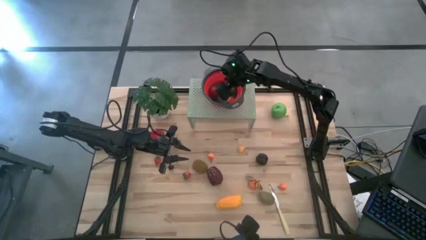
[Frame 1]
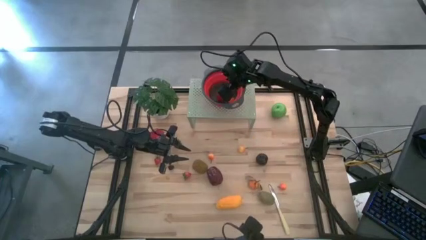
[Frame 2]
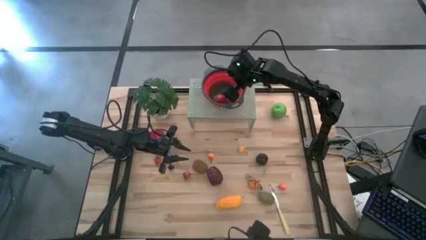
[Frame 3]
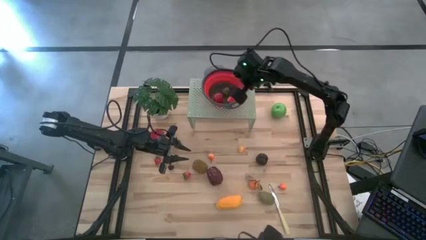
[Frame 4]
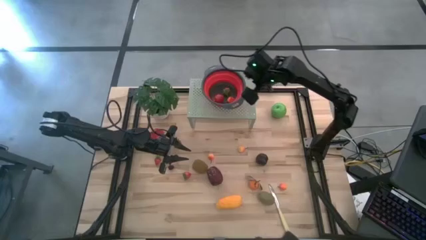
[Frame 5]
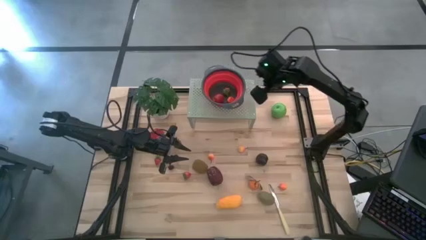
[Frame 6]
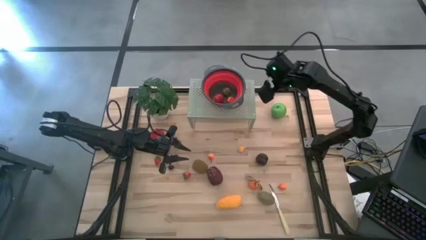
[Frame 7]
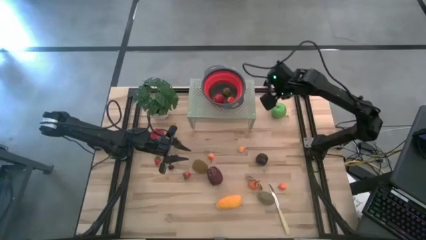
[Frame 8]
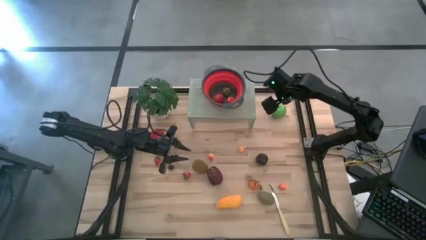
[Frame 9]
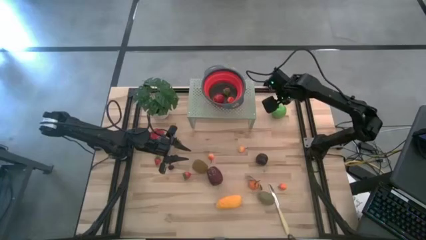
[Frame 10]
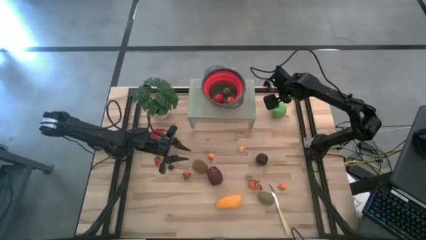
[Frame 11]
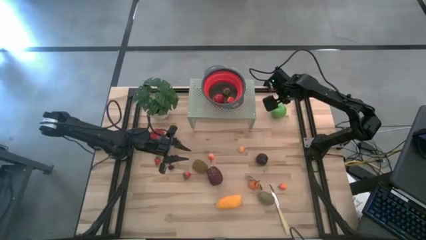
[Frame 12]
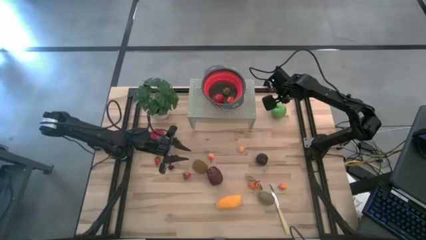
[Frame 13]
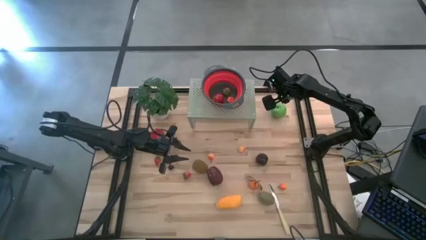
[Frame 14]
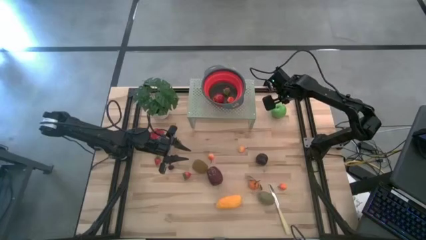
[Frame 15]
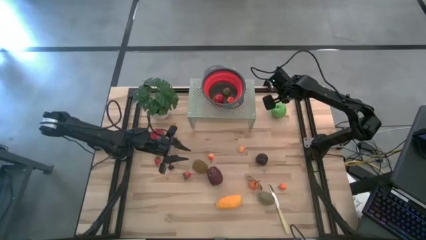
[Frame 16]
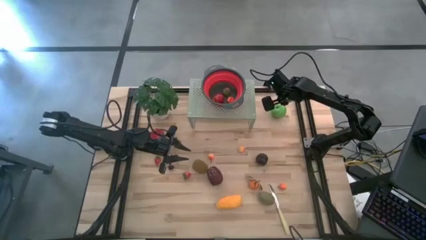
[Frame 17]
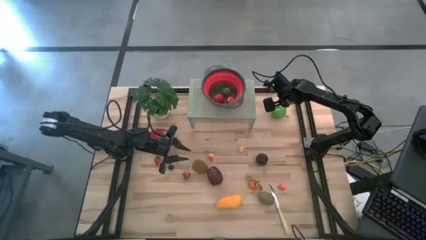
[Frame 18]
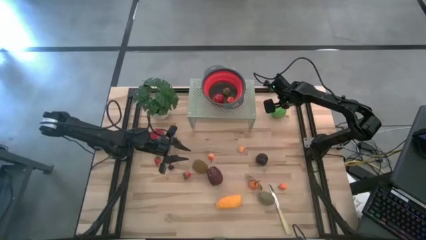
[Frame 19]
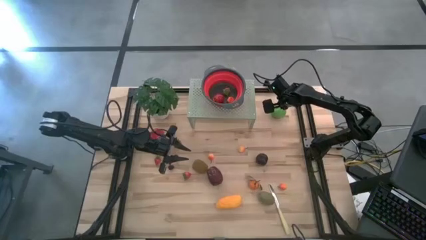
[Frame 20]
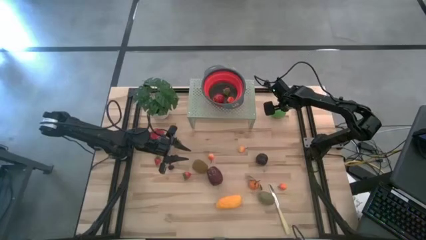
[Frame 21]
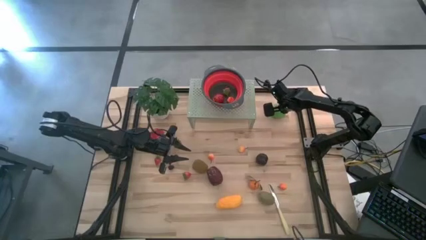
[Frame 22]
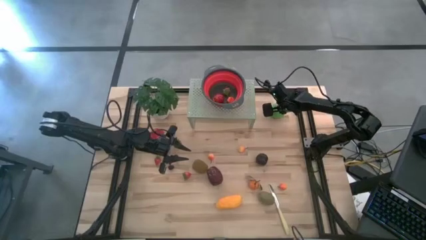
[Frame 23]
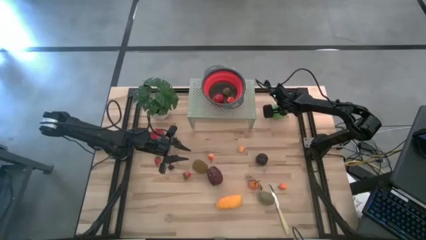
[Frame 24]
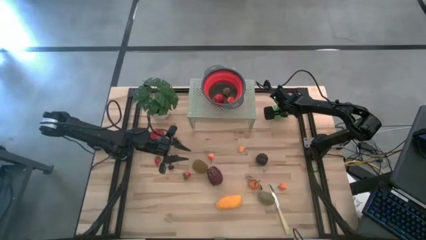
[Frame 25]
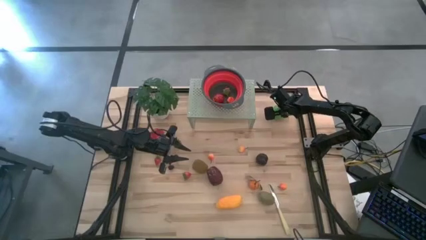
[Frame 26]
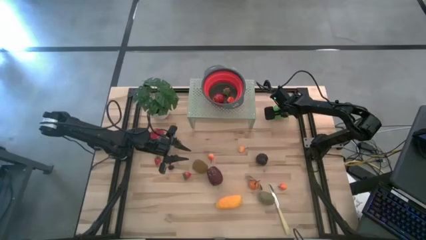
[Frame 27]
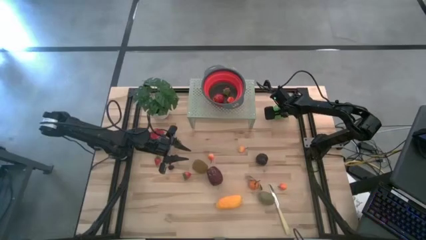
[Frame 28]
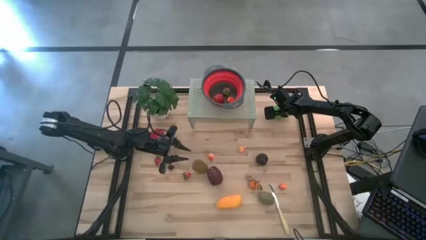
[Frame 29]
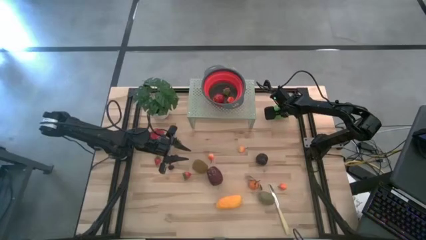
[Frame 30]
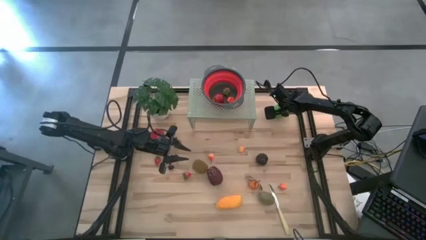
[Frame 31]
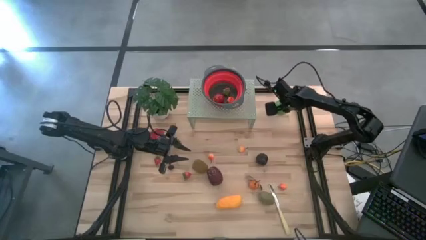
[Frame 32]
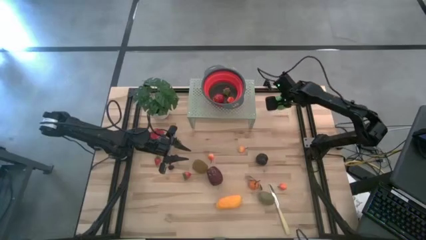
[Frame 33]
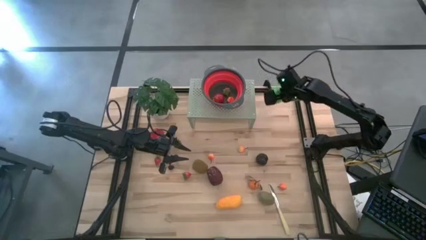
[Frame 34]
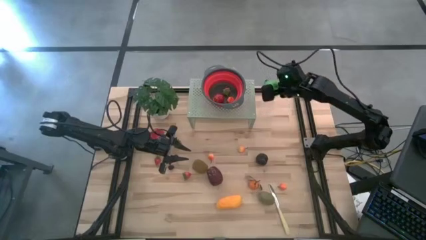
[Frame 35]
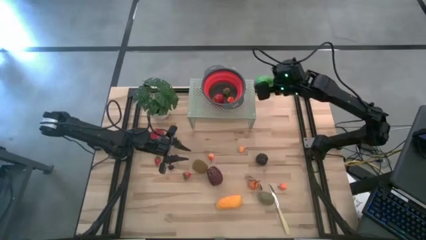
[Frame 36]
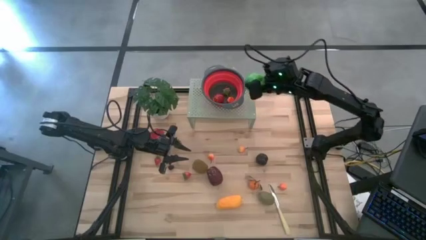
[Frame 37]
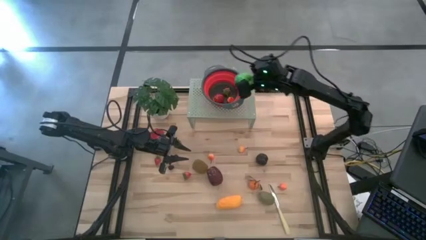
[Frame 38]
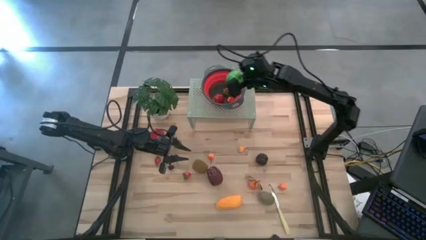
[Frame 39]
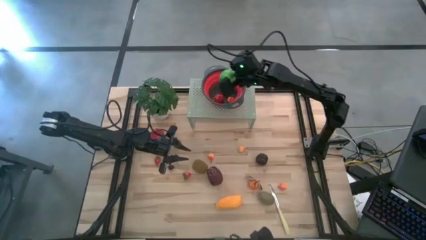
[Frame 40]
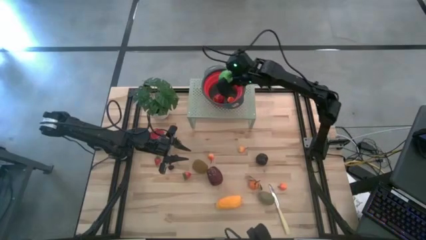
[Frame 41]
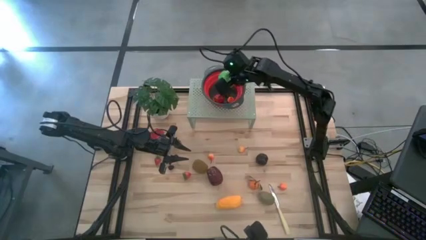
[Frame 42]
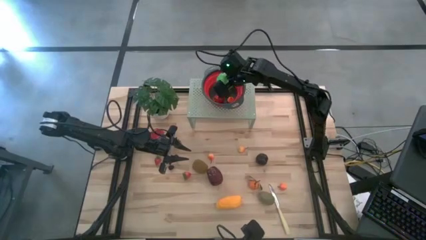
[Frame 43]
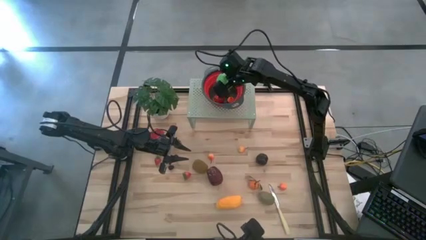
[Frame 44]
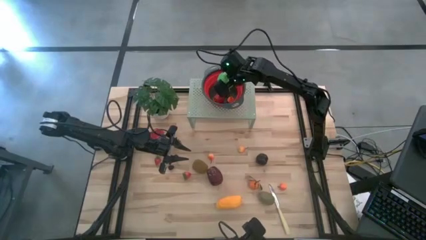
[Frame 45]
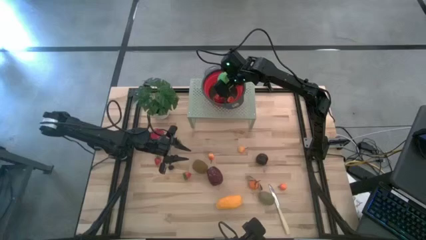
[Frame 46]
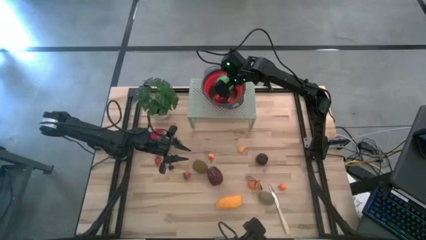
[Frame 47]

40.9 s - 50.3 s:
Task: Pick & Place Fruit
Put the apple into the red strainer bowl on the shelf

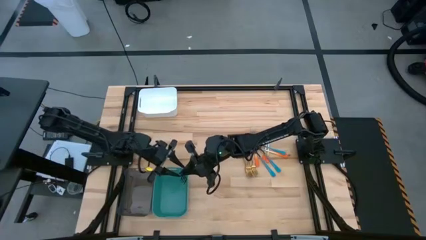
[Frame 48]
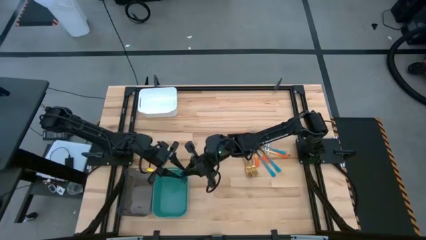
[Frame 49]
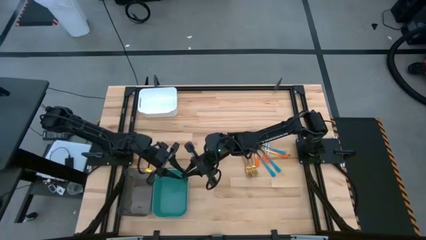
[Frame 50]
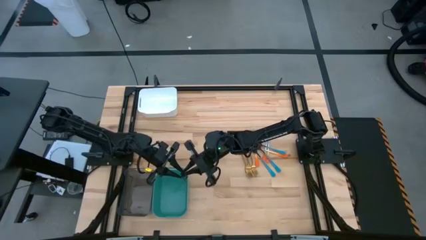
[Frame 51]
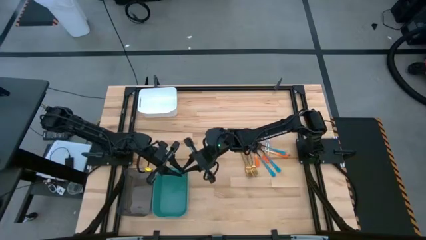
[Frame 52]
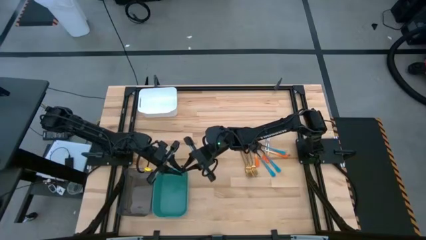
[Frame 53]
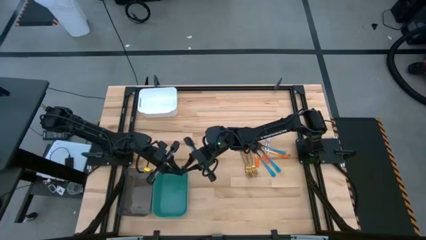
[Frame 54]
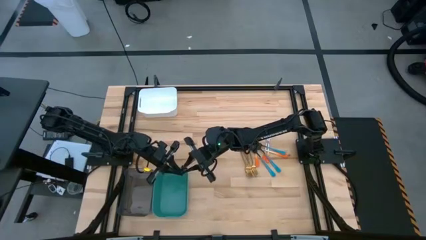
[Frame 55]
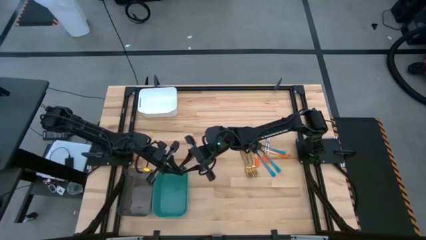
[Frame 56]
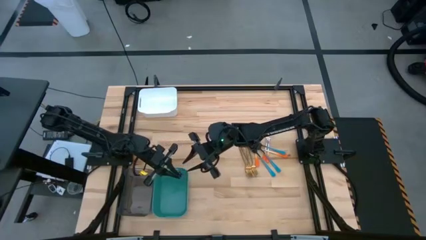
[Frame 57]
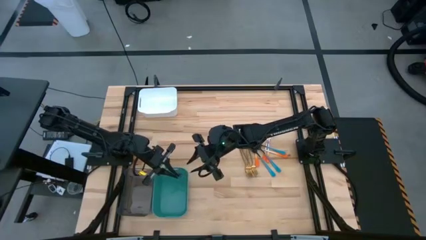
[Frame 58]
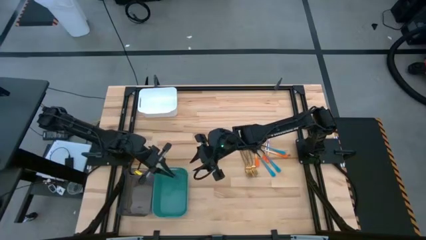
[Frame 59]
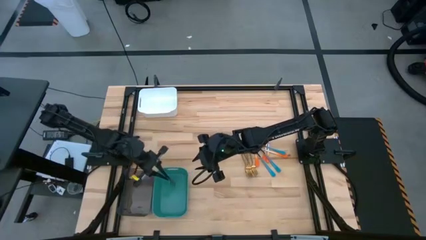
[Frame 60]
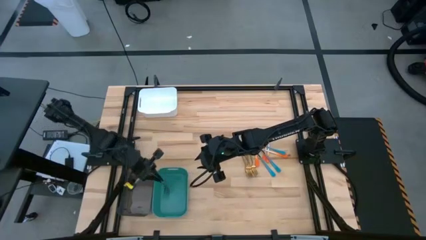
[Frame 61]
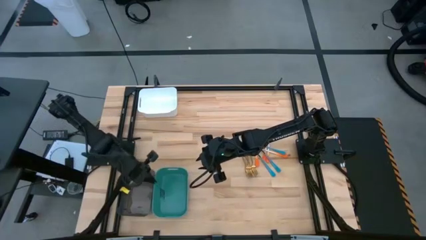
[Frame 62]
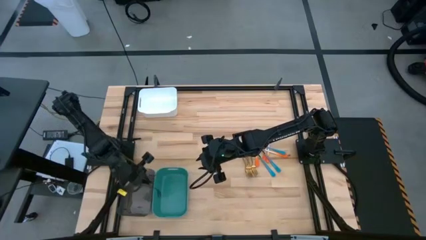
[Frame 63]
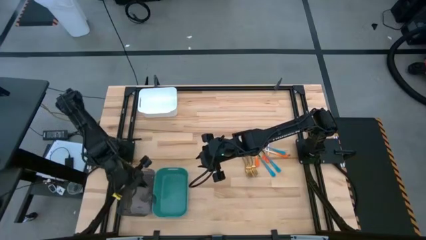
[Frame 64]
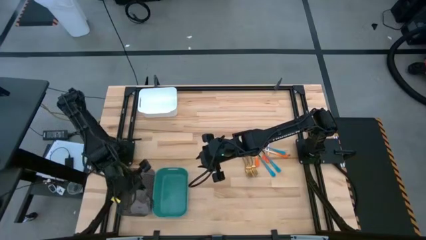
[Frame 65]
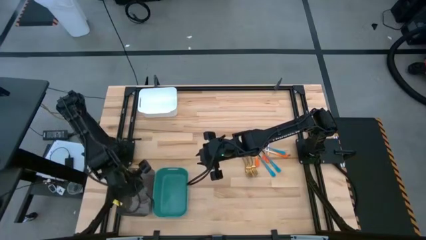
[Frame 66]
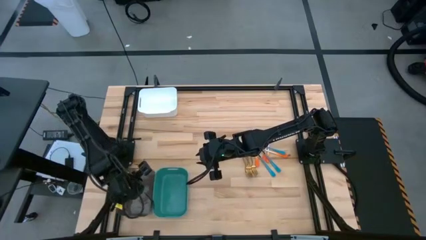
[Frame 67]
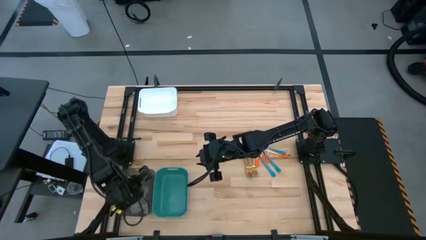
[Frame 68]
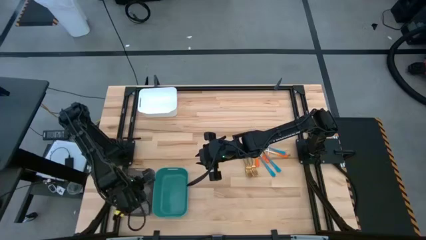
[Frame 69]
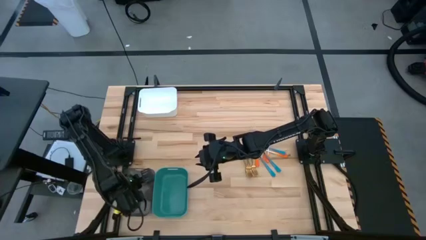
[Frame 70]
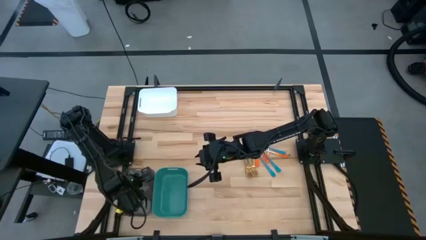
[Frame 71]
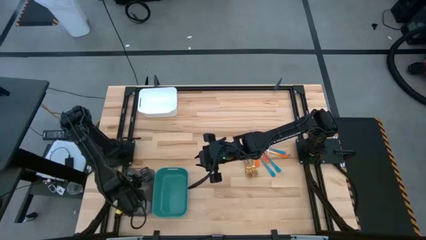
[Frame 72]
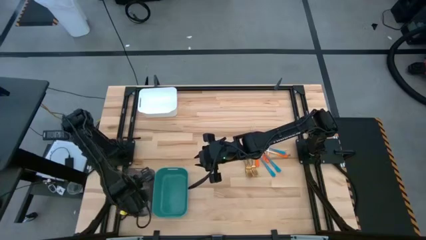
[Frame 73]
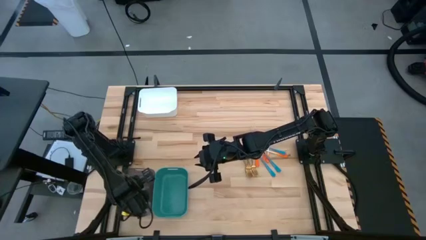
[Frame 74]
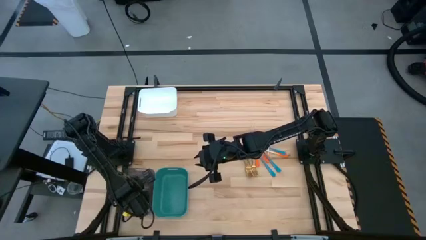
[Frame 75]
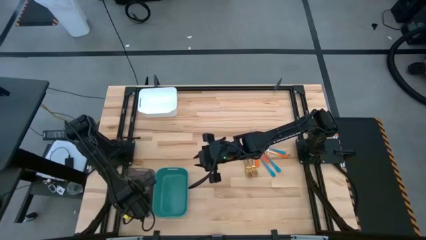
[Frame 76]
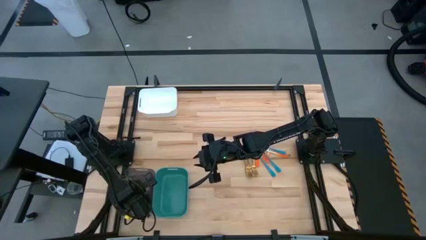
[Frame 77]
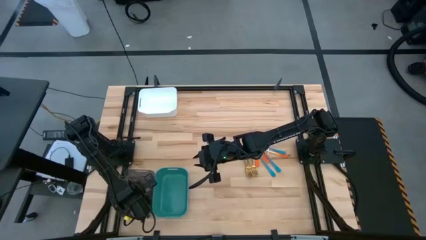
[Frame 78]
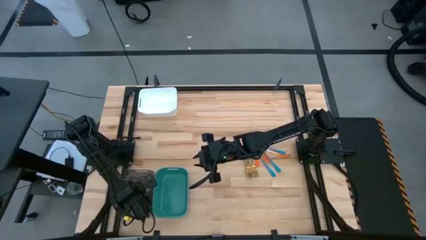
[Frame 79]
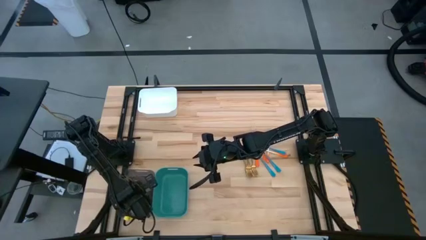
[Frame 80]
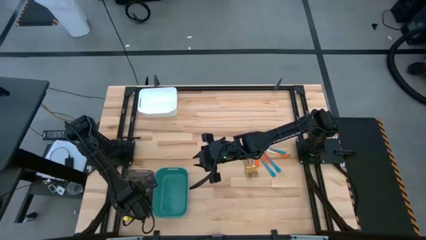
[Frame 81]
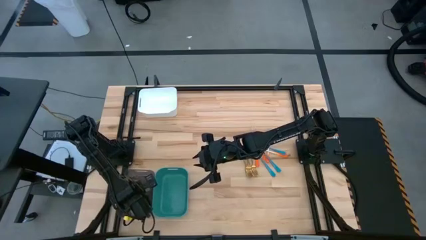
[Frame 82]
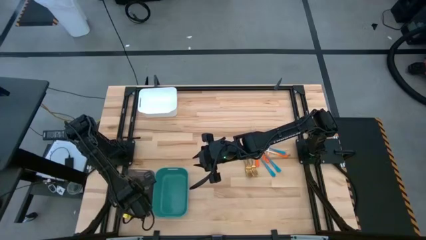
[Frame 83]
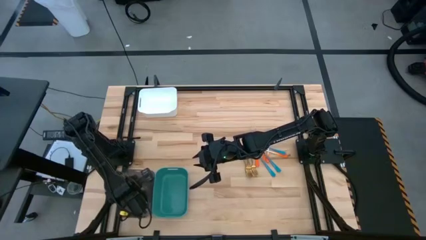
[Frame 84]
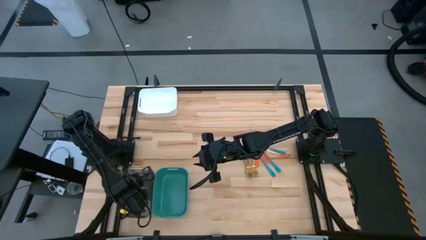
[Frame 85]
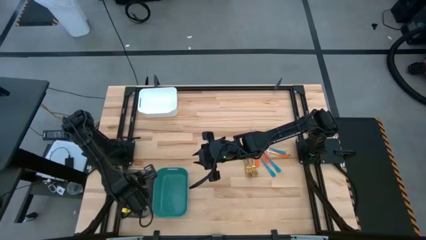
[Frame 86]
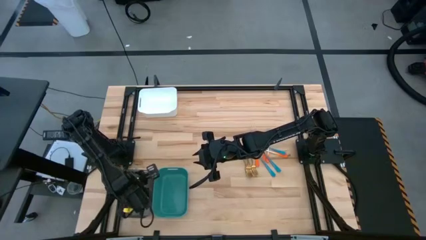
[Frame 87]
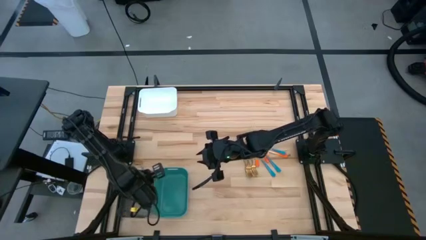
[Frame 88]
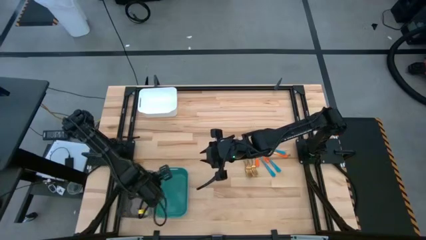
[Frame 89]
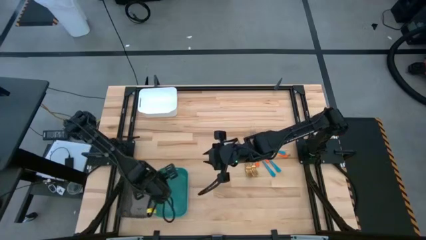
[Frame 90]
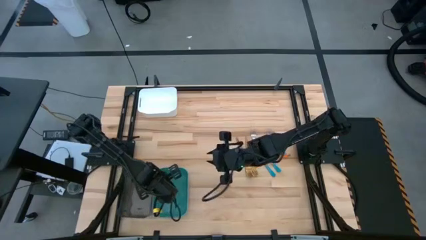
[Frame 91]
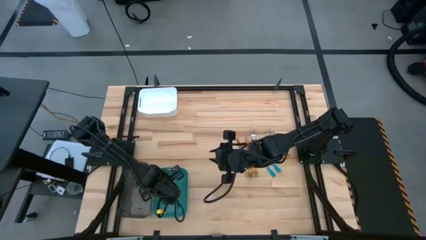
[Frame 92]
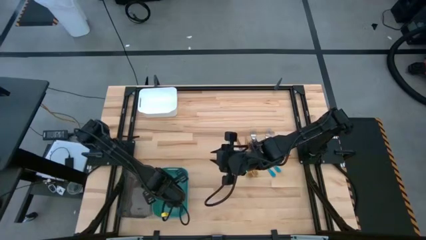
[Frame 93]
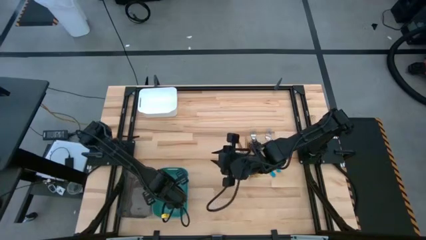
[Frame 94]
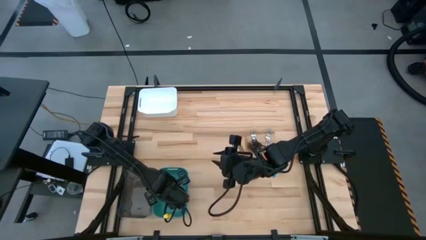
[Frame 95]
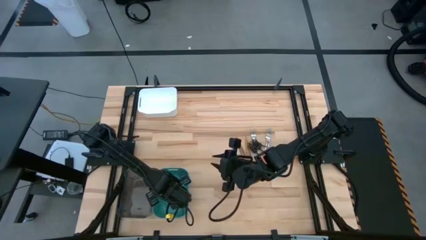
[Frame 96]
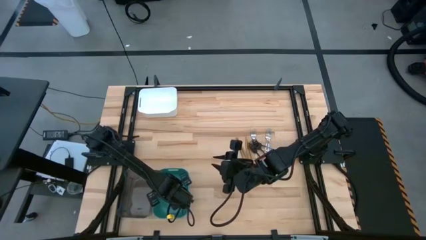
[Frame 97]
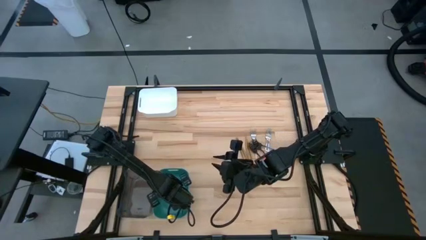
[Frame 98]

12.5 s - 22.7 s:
Task: Sort silverware by color (type)
Put the blue fork into the green bin
